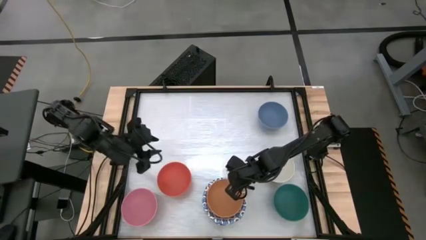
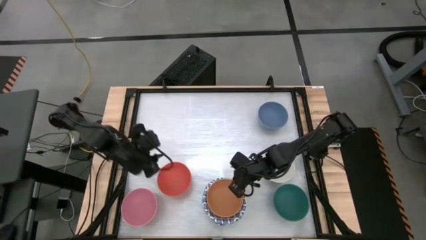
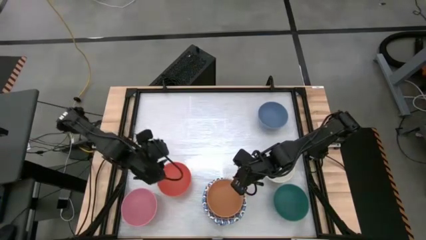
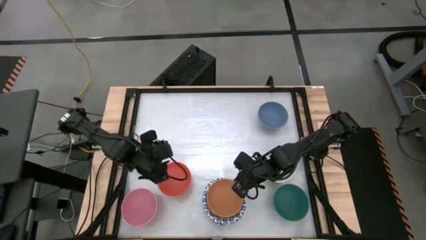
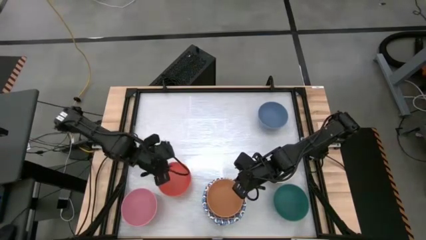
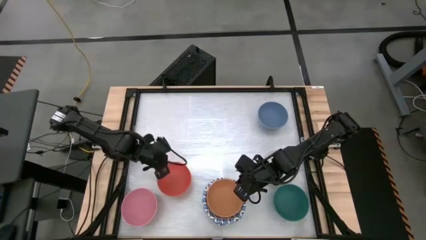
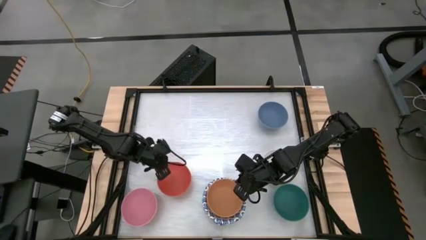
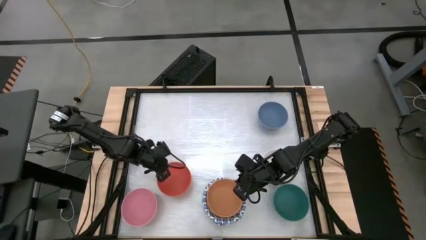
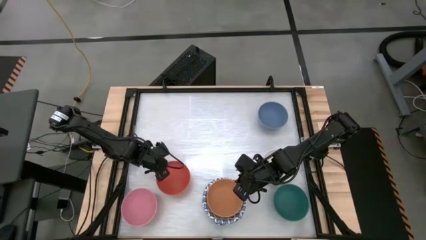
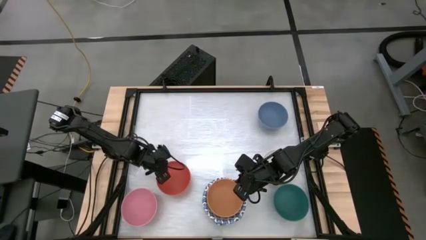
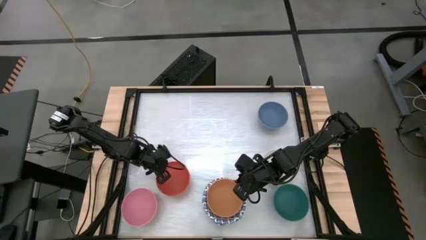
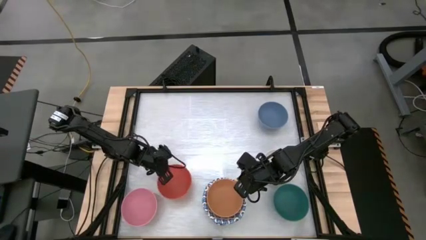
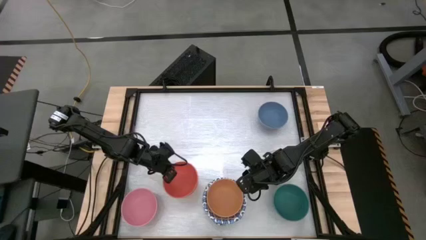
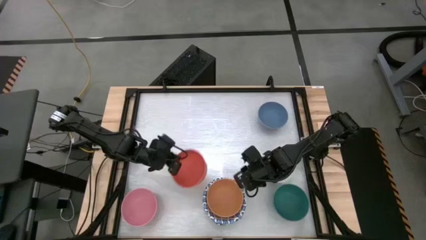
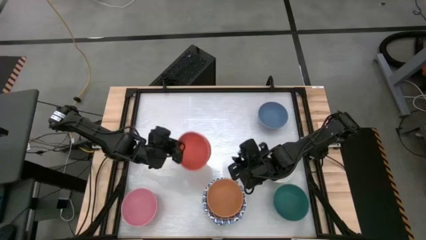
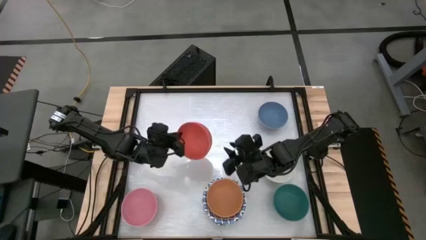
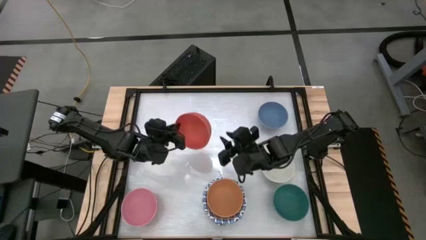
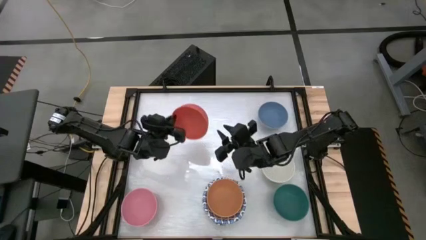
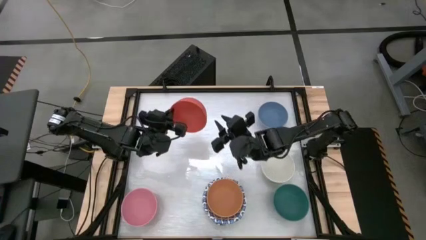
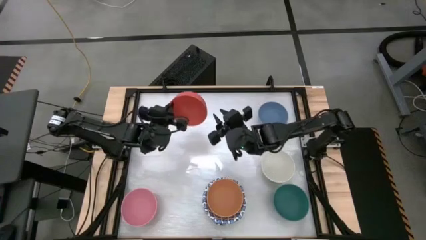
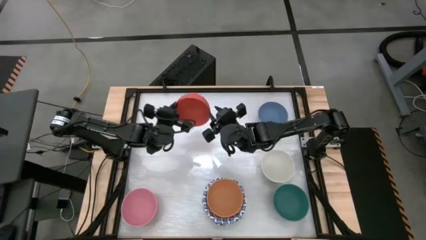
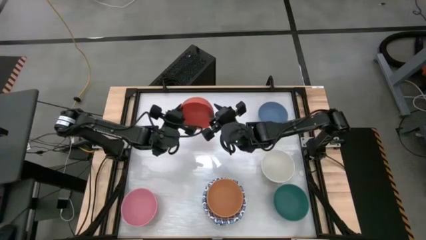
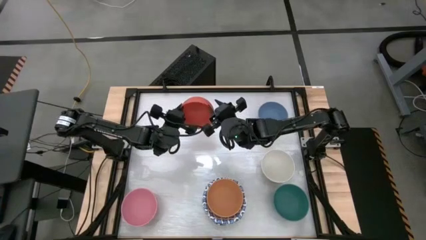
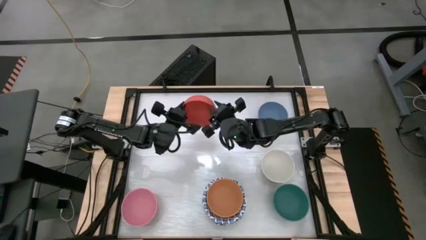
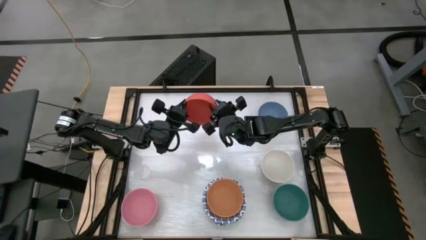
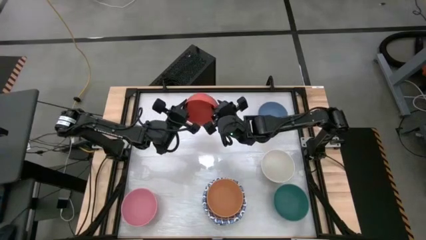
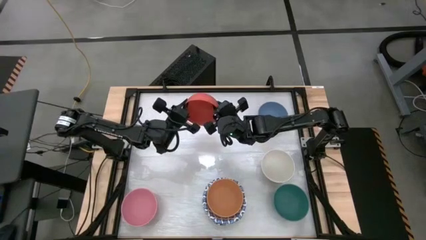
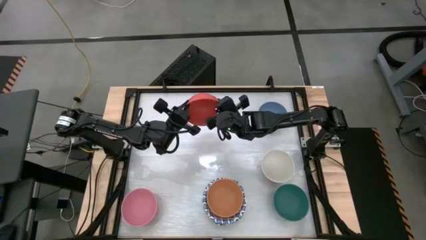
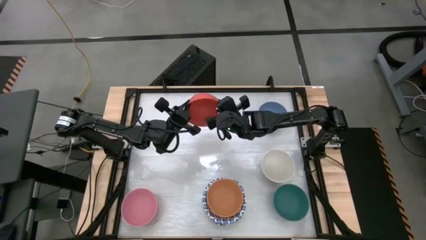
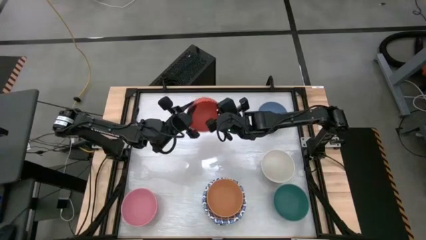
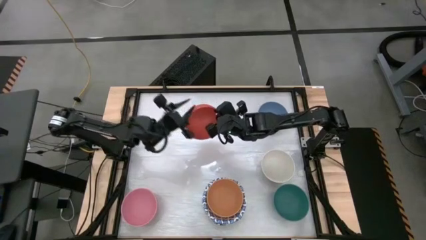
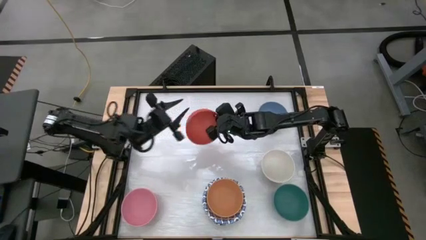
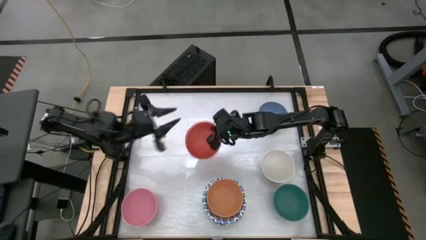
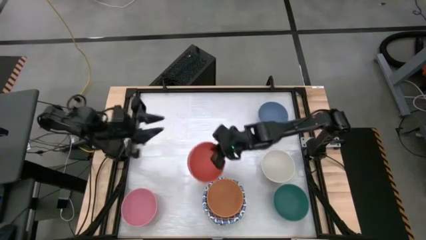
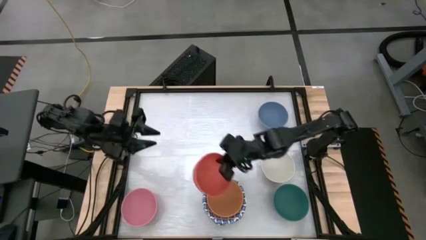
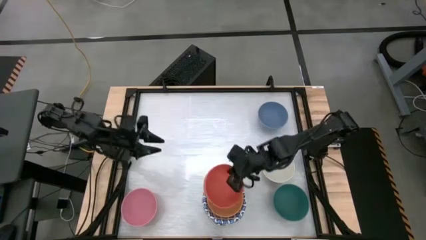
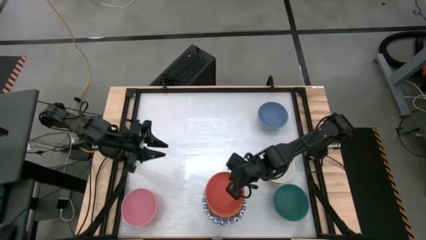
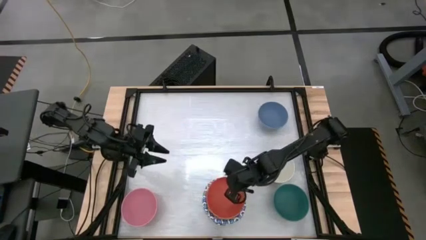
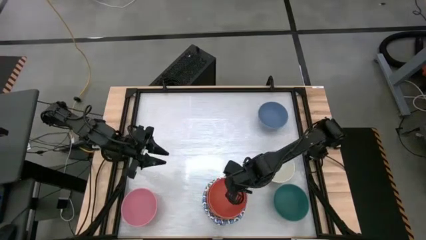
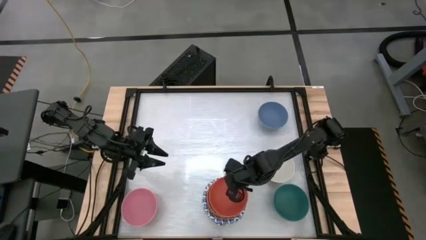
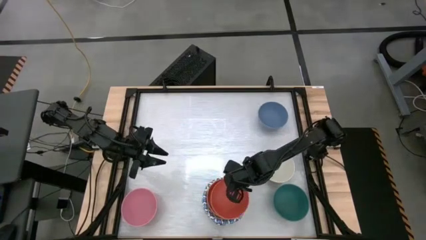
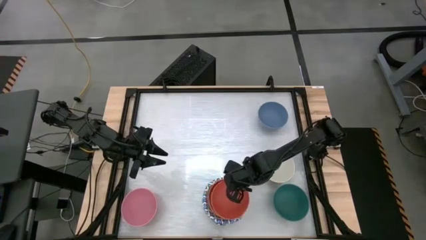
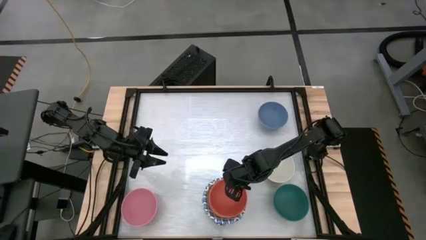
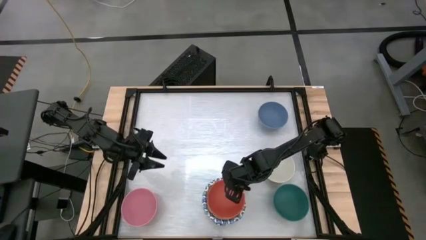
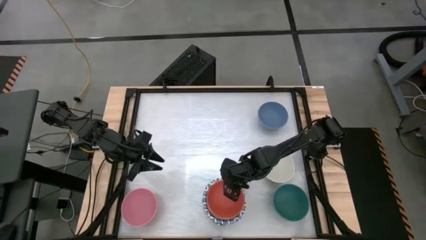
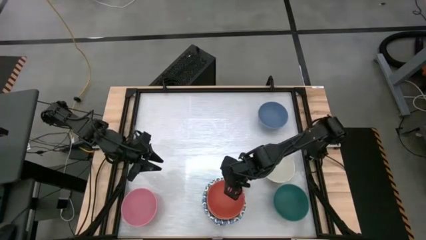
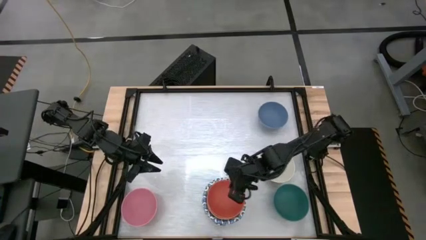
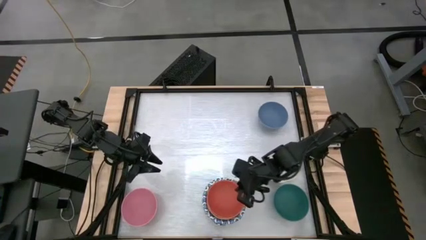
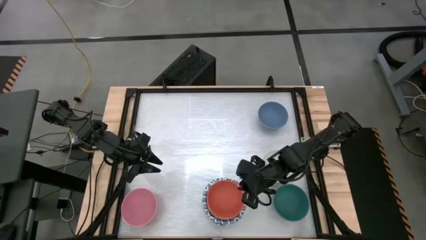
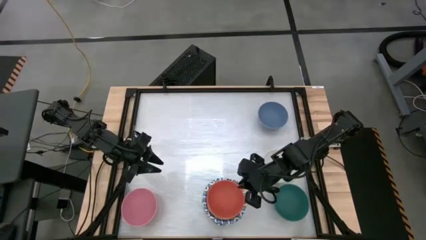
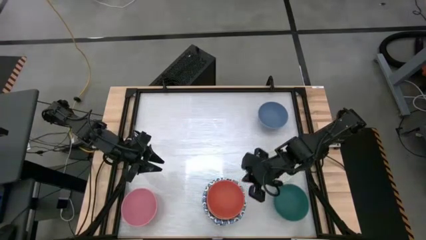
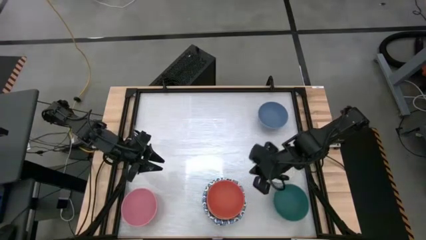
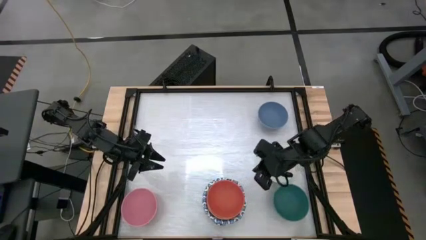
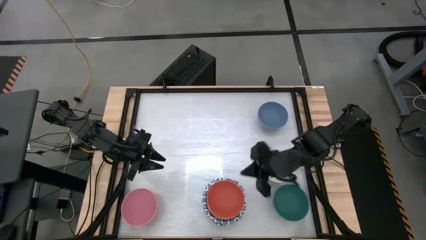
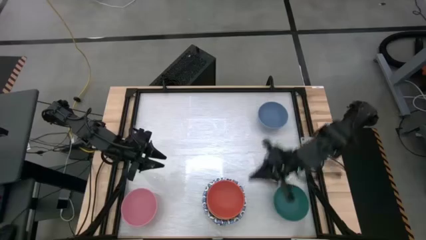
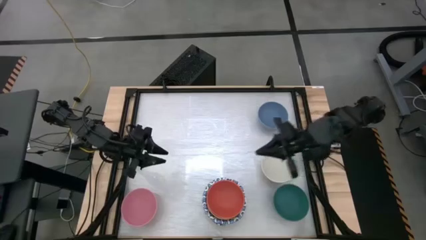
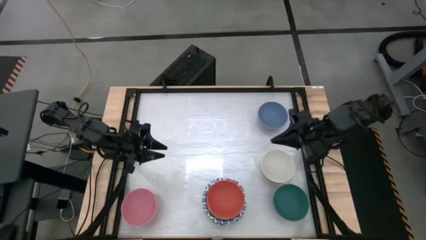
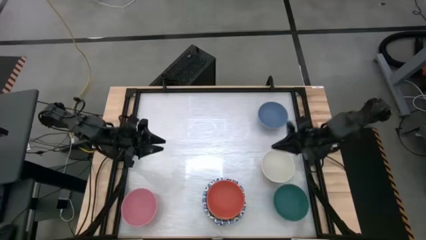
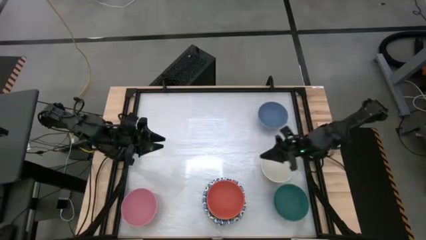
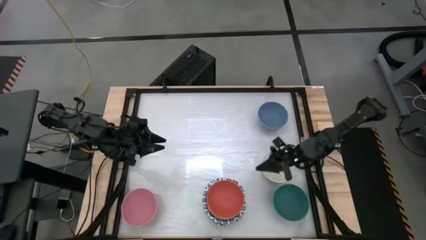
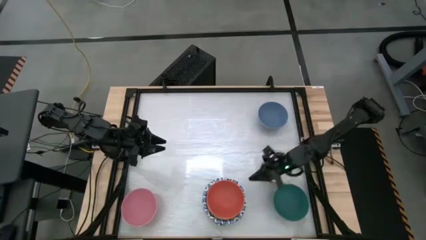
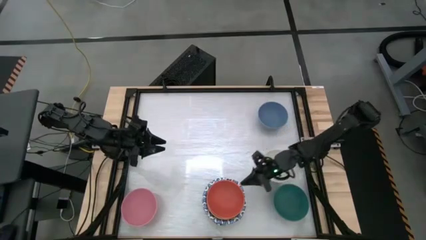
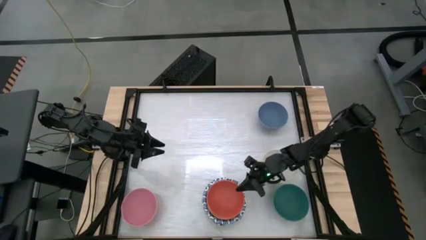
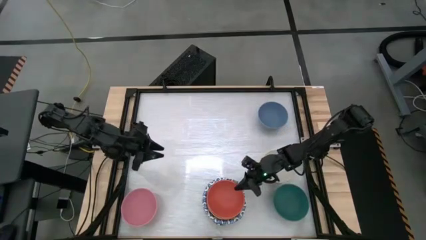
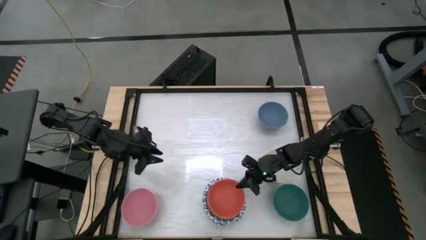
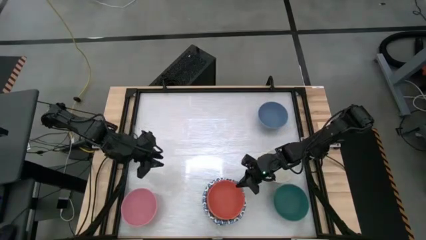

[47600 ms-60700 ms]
Task: Nest bowls inside each other by size order
Stack the orange bowl on top of the brown bowl

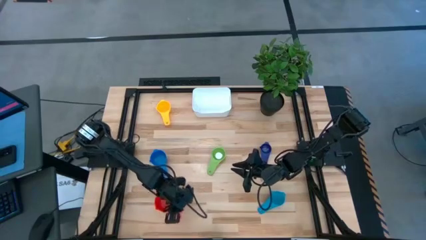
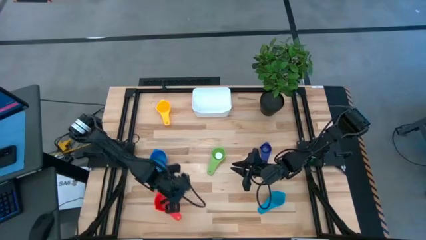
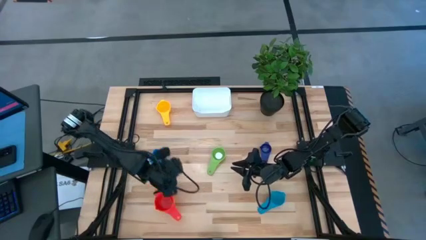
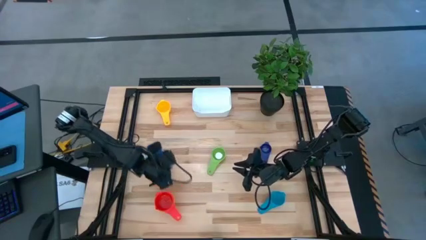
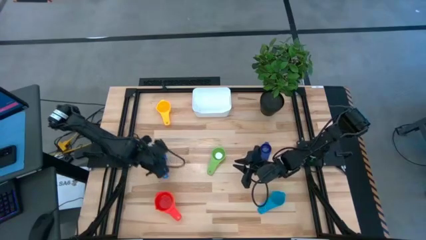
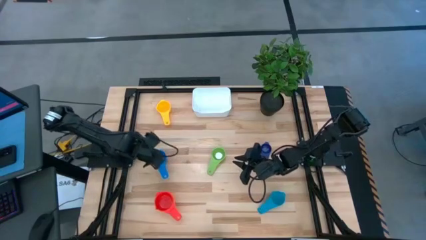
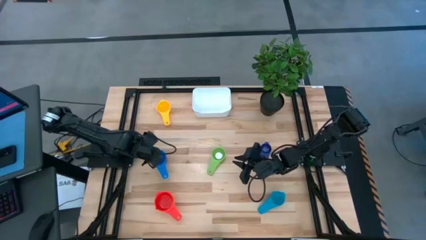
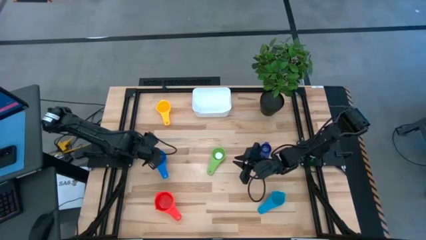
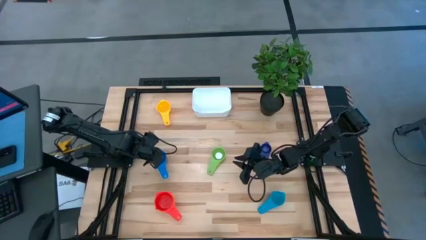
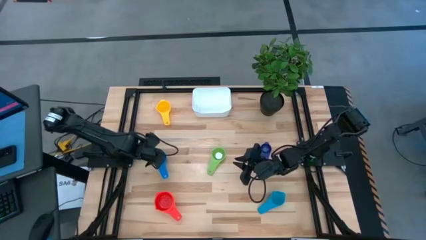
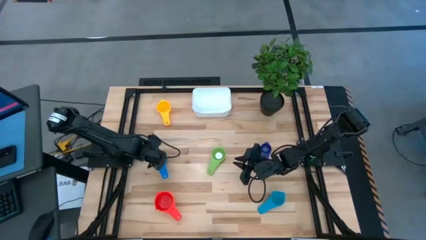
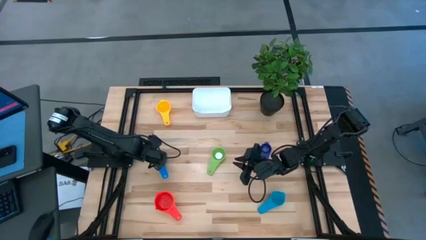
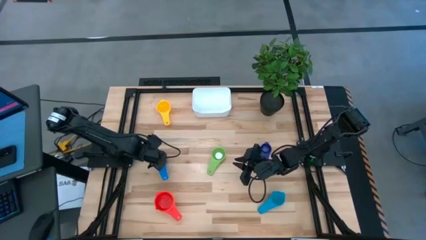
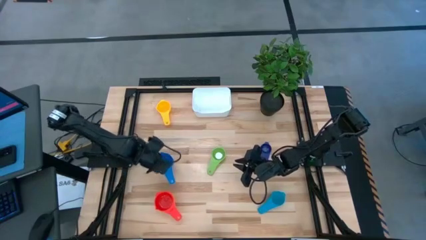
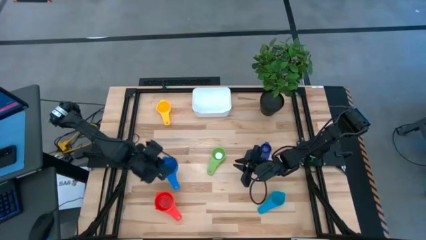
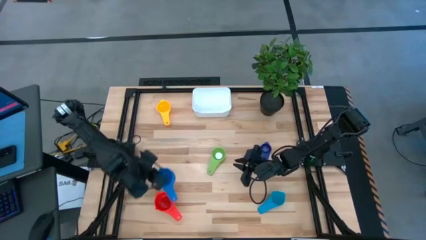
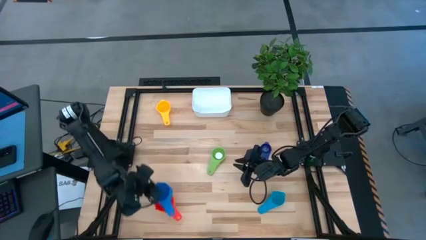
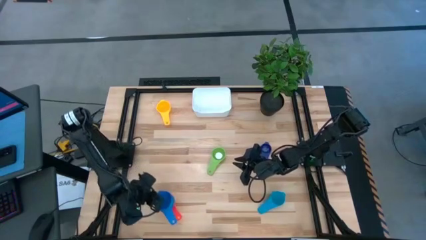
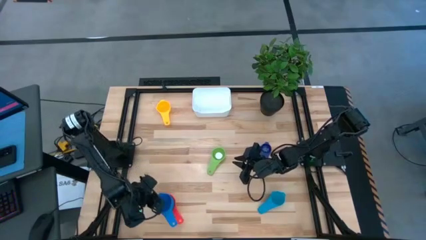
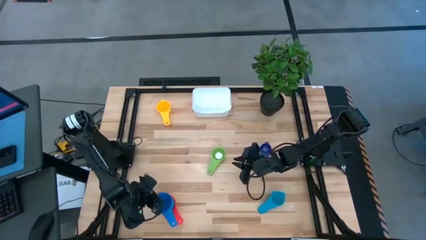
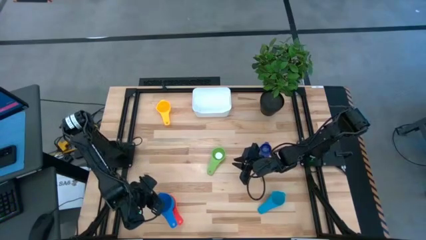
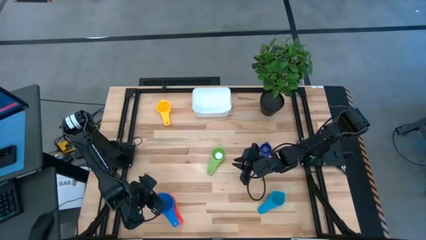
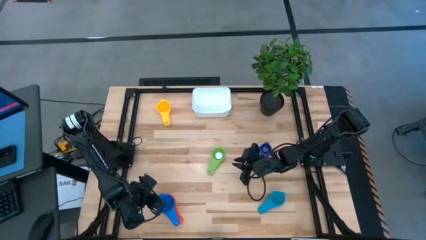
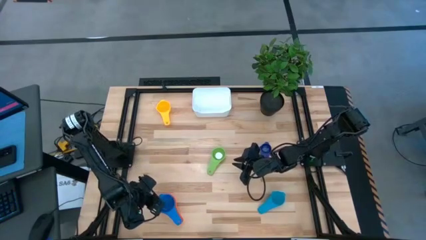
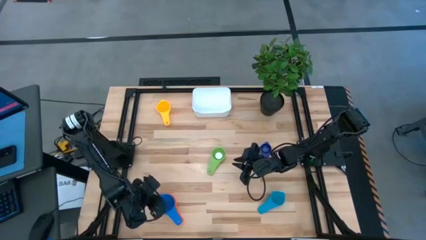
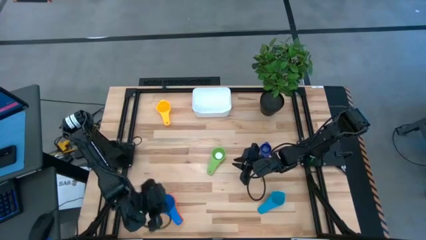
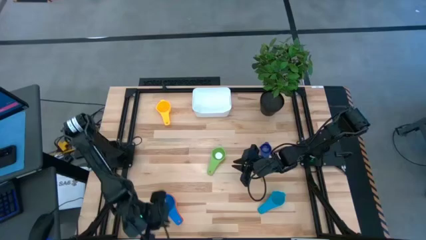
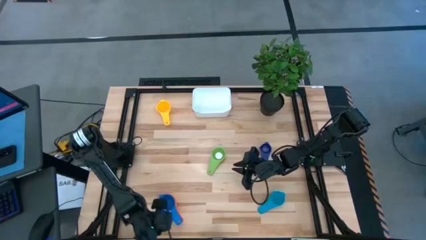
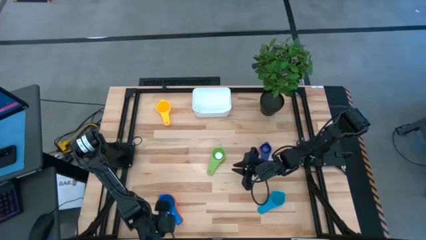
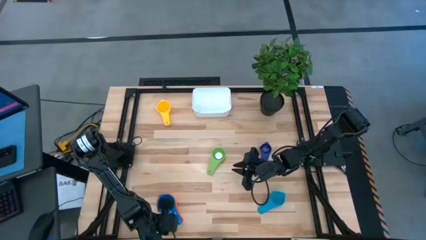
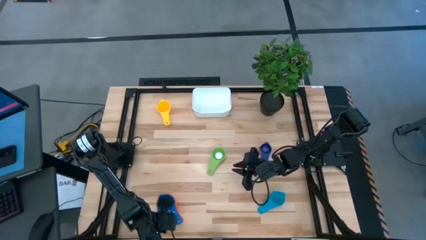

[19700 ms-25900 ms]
Task: Nest measuring cups in basket
Stack the dark blue measuring cup into the red measuring cup
